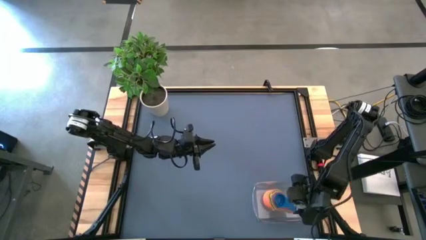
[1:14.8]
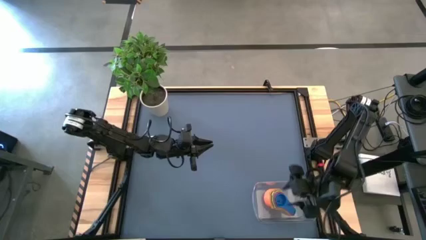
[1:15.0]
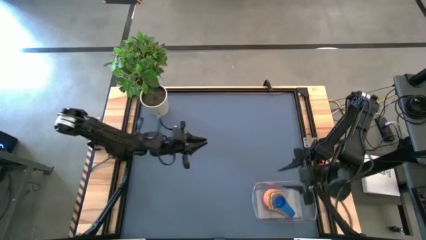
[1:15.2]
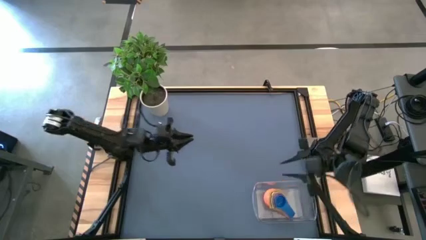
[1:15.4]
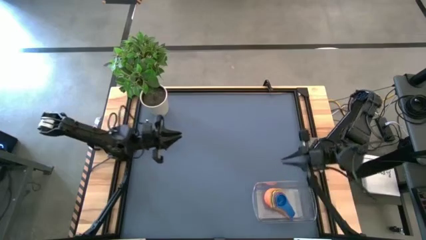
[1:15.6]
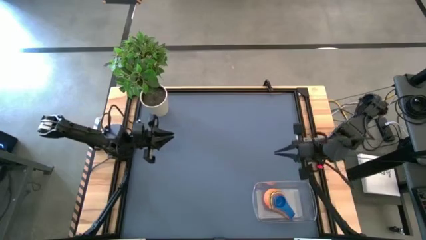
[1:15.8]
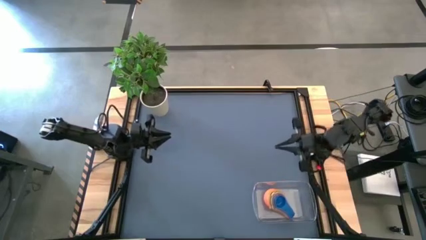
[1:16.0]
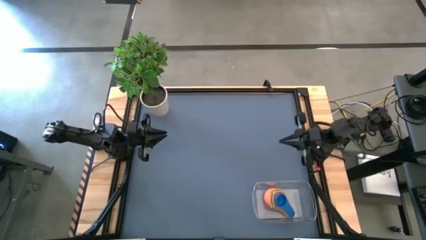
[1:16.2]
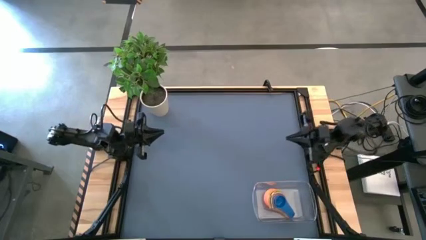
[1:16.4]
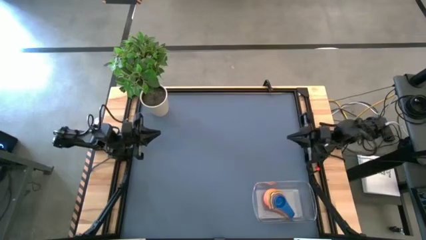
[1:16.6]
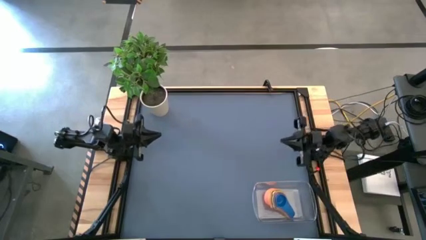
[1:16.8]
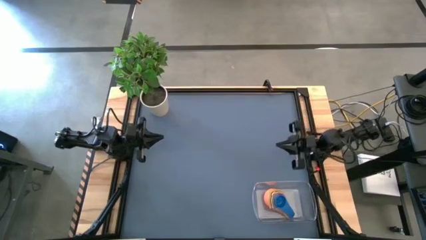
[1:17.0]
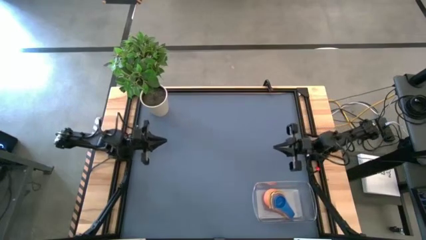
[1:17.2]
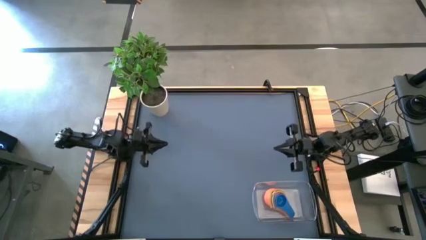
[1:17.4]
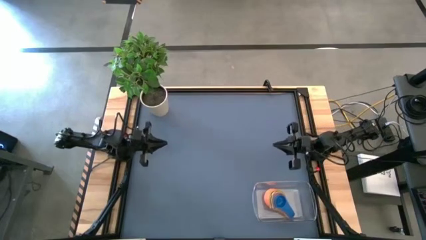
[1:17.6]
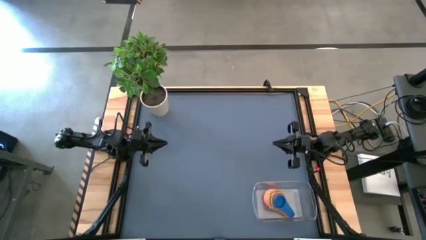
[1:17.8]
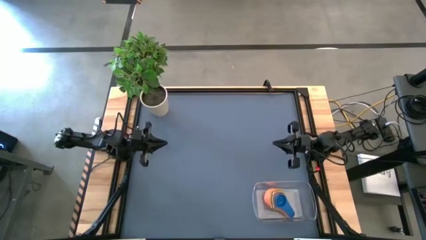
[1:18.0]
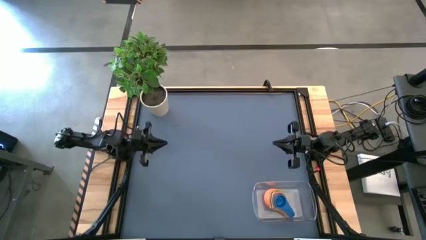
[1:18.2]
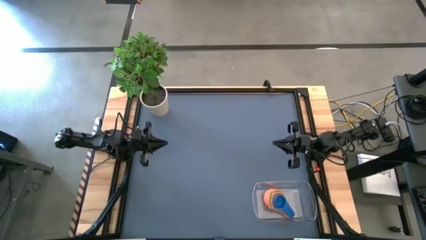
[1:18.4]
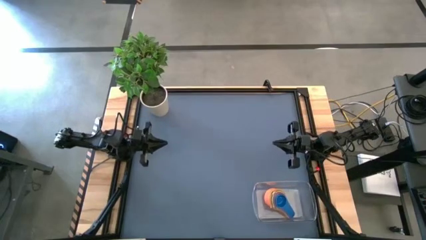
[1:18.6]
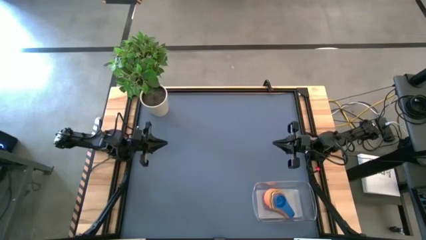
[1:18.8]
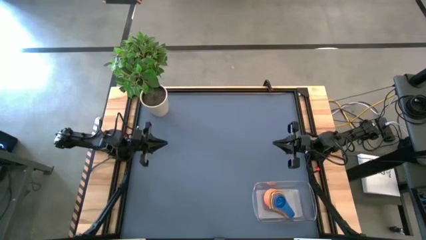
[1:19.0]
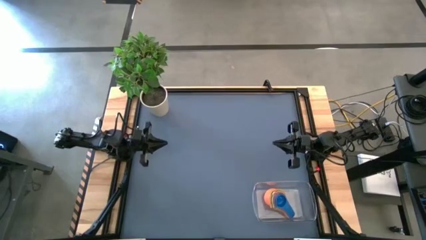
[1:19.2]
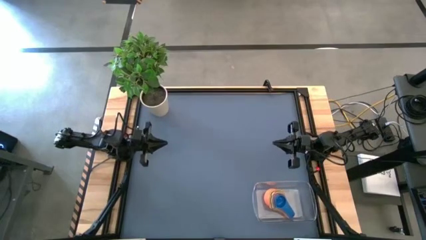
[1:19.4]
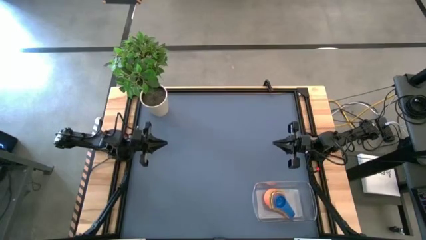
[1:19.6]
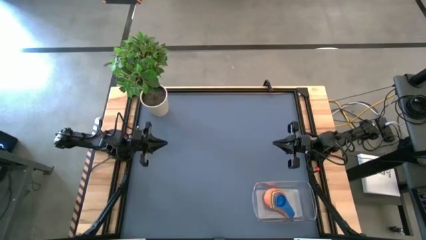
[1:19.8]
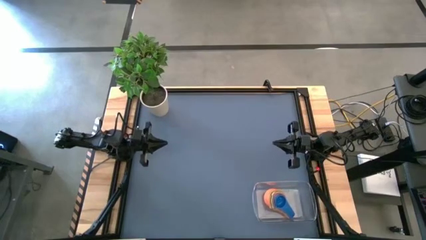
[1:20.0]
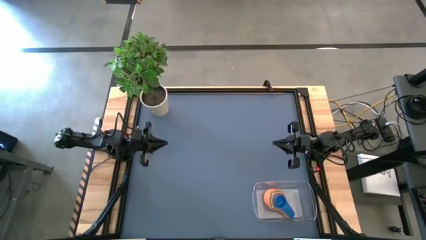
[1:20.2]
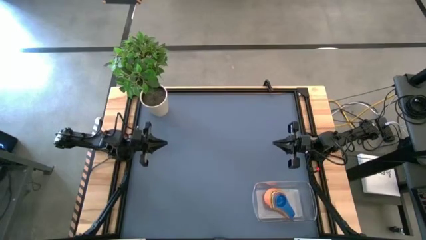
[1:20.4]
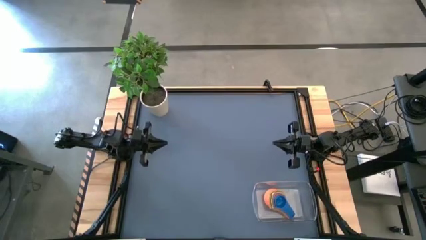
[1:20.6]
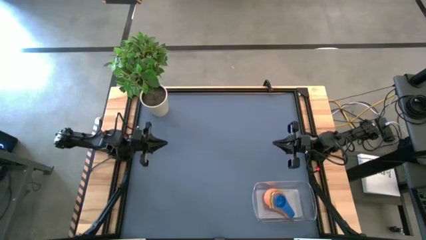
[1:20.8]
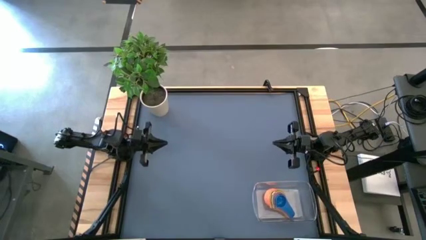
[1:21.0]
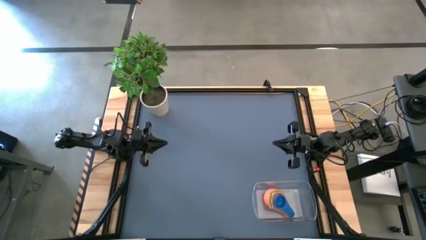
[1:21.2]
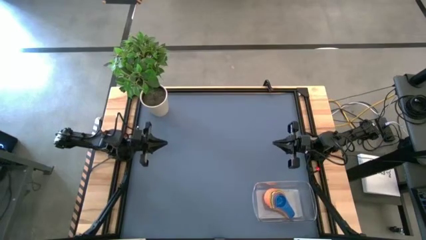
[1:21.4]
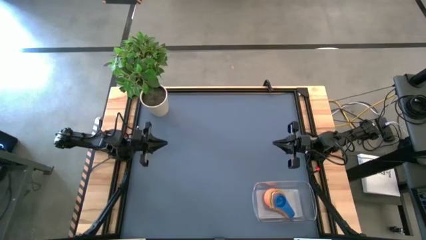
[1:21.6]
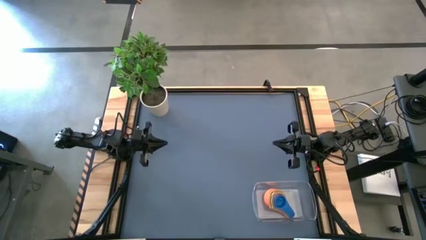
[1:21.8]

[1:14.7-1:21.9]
Task: Nest measuring cups in basket
Return to Home position

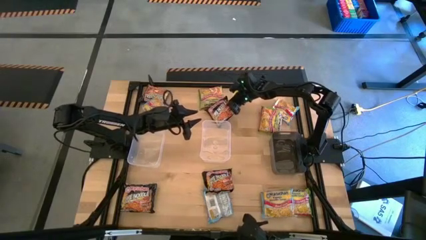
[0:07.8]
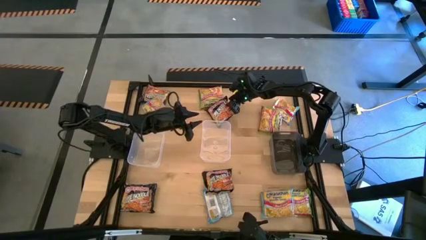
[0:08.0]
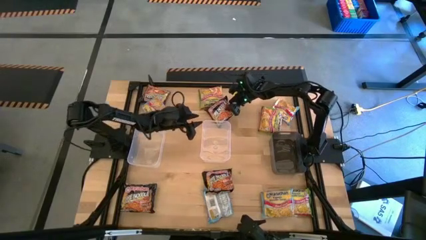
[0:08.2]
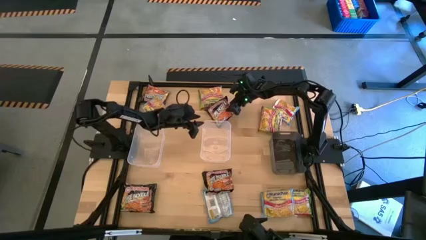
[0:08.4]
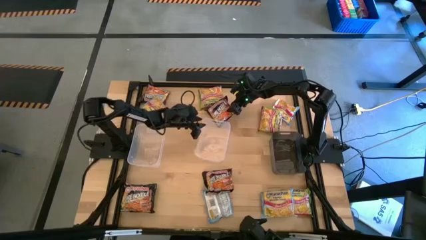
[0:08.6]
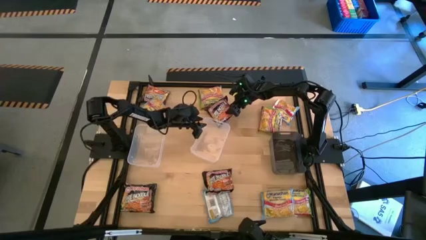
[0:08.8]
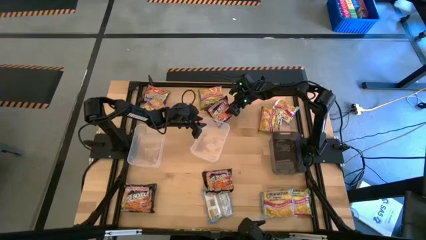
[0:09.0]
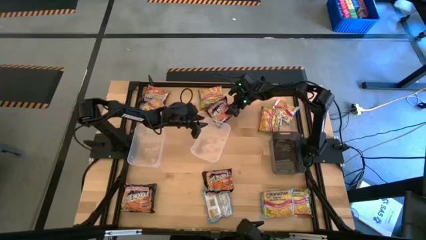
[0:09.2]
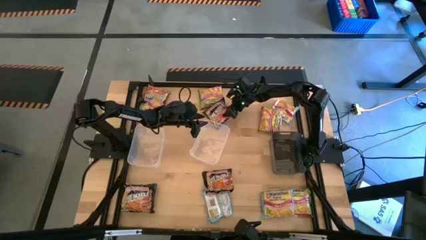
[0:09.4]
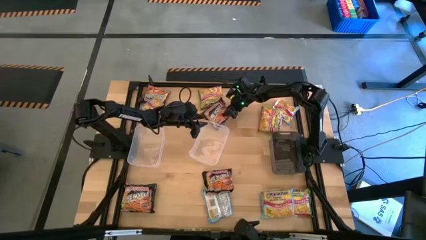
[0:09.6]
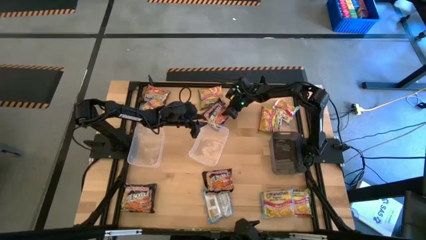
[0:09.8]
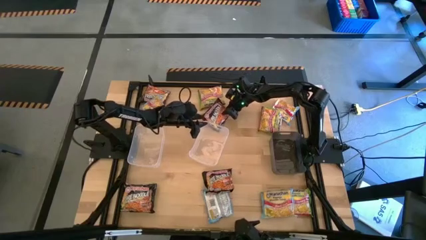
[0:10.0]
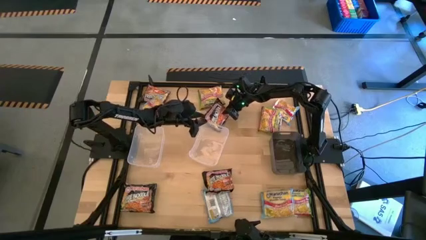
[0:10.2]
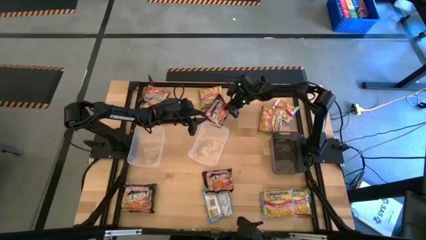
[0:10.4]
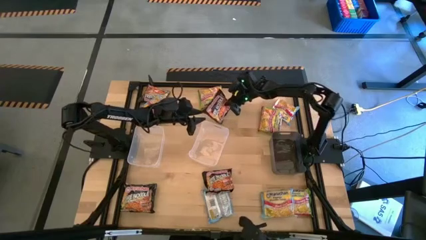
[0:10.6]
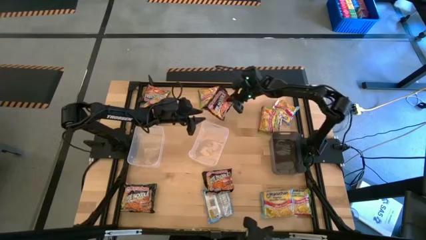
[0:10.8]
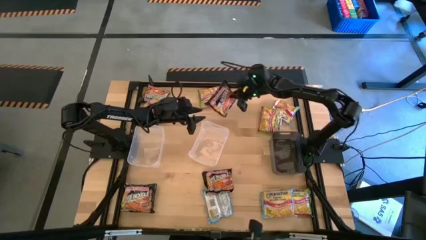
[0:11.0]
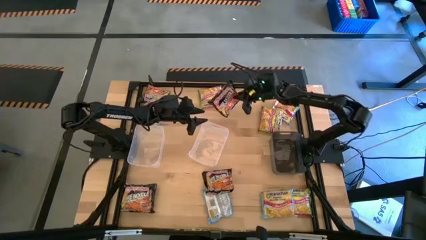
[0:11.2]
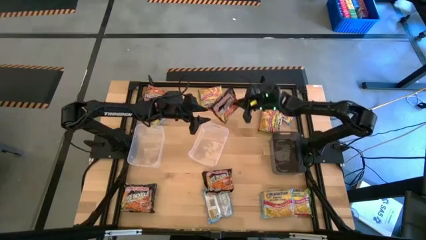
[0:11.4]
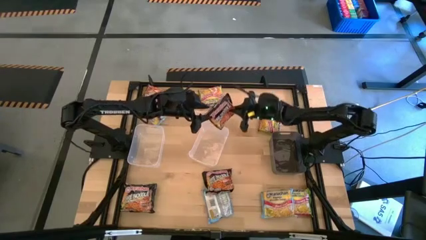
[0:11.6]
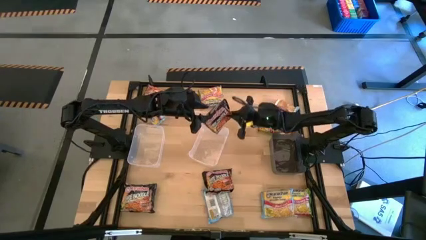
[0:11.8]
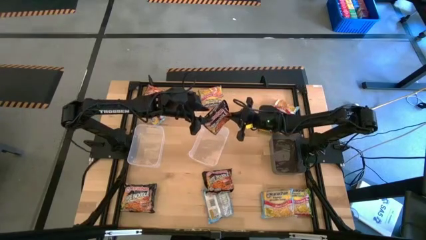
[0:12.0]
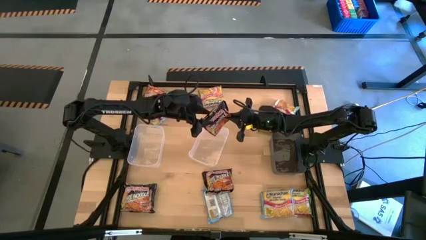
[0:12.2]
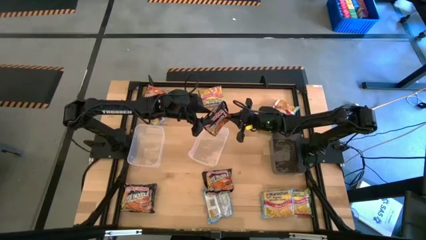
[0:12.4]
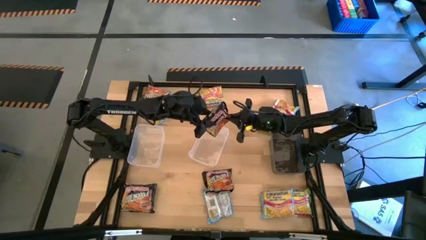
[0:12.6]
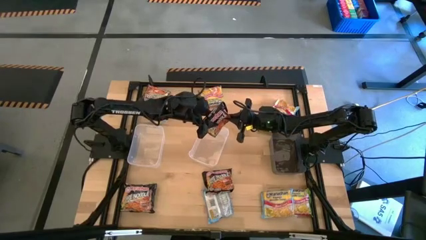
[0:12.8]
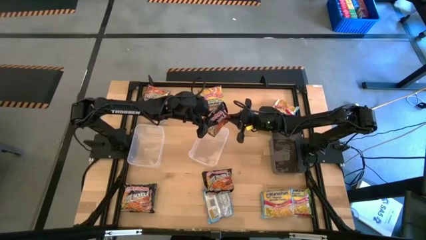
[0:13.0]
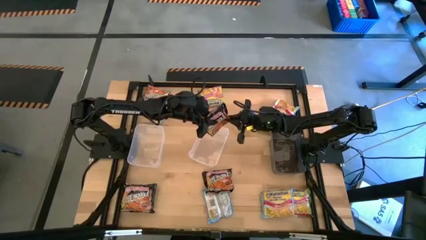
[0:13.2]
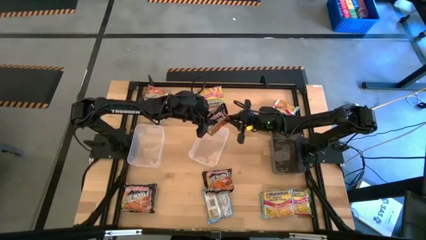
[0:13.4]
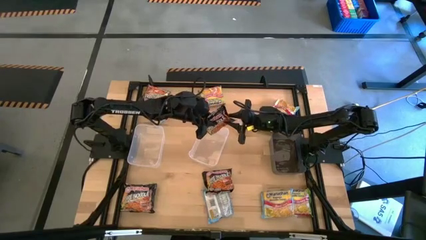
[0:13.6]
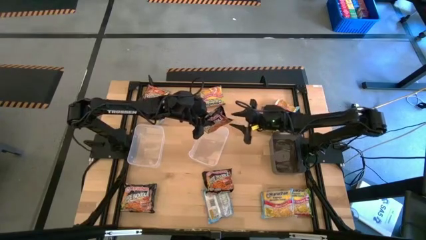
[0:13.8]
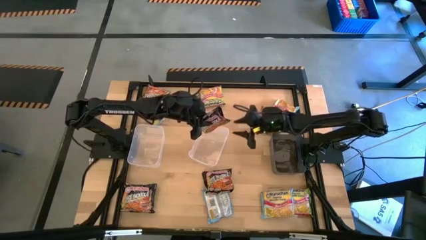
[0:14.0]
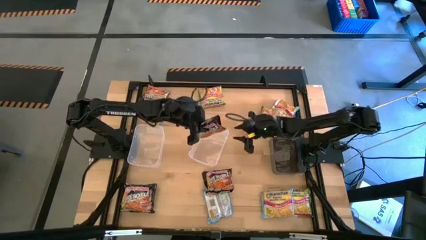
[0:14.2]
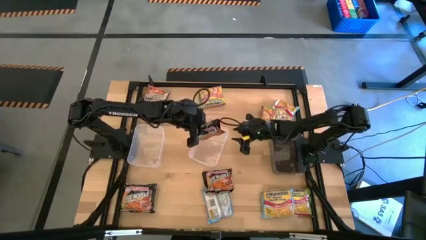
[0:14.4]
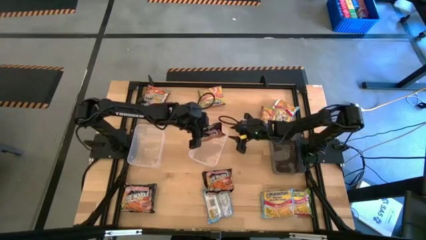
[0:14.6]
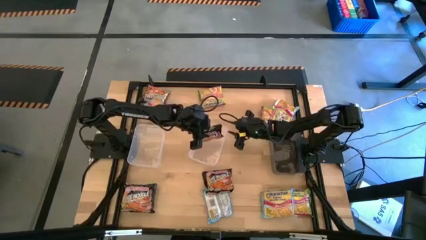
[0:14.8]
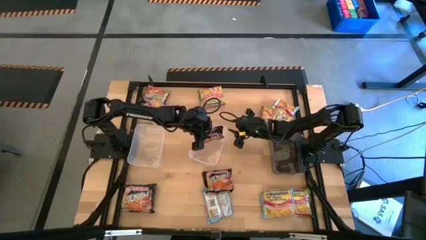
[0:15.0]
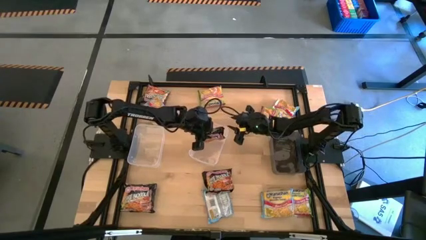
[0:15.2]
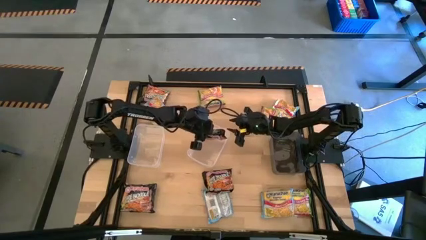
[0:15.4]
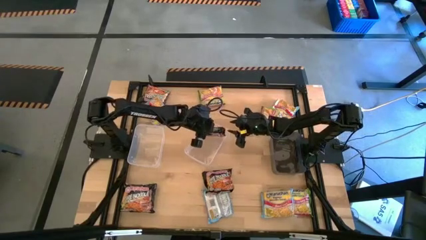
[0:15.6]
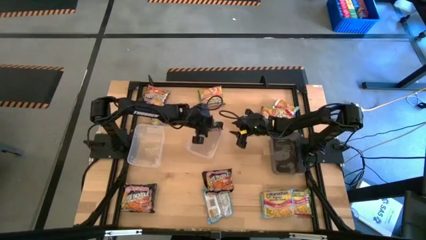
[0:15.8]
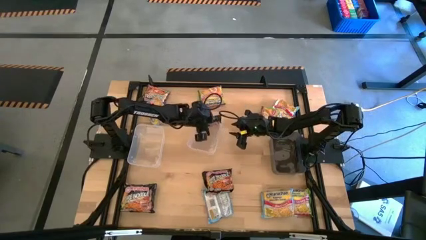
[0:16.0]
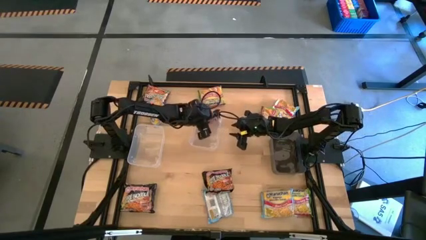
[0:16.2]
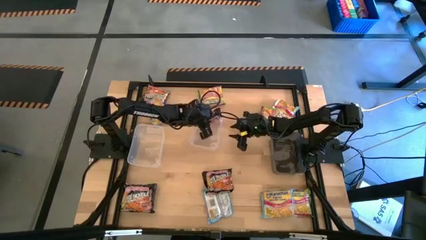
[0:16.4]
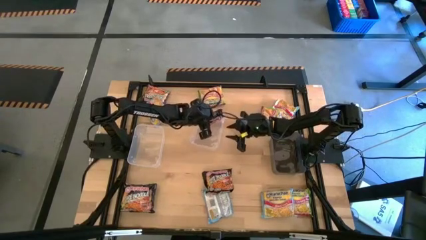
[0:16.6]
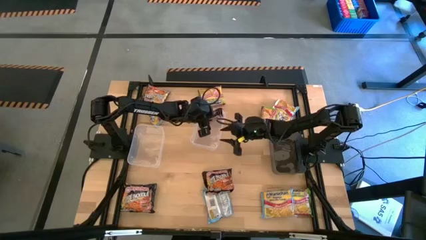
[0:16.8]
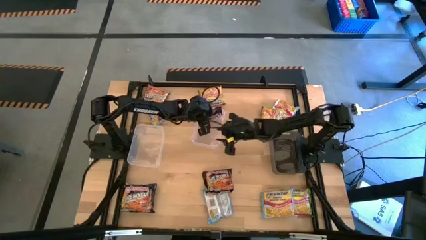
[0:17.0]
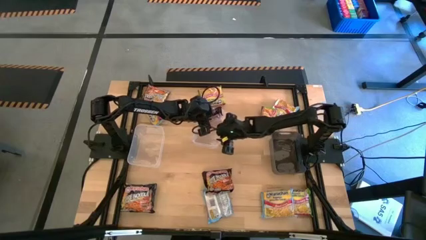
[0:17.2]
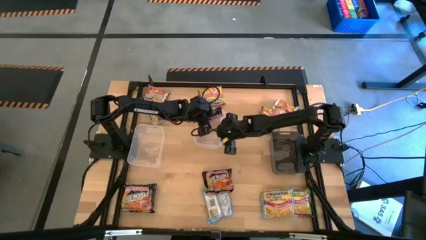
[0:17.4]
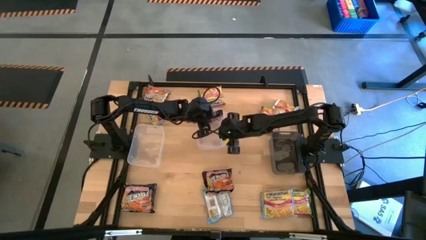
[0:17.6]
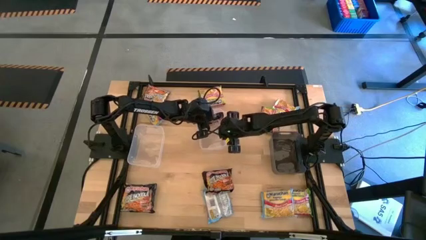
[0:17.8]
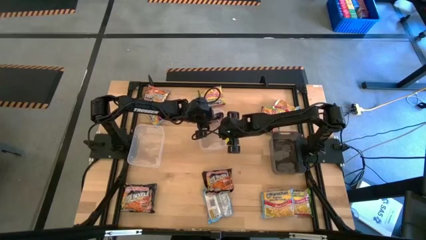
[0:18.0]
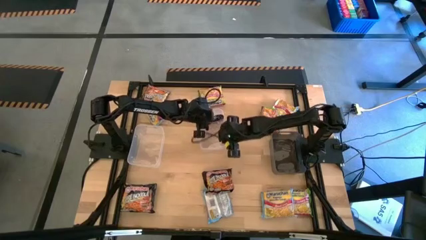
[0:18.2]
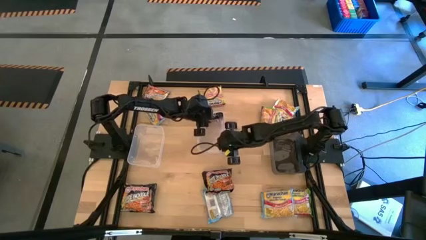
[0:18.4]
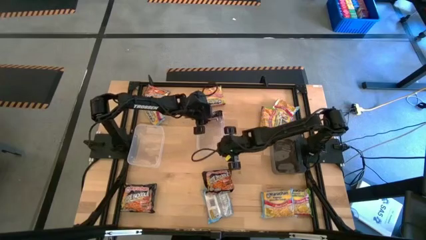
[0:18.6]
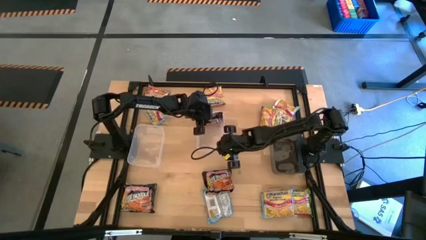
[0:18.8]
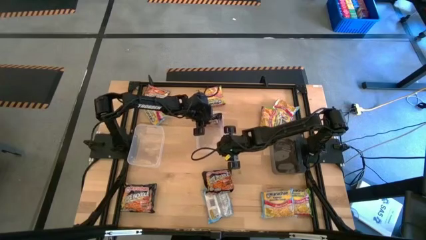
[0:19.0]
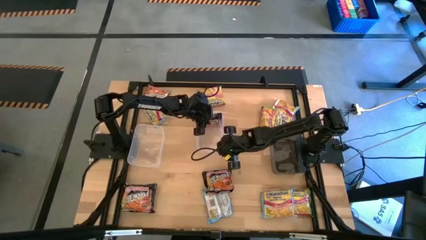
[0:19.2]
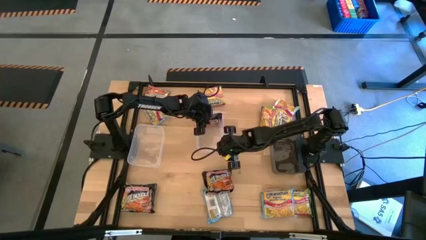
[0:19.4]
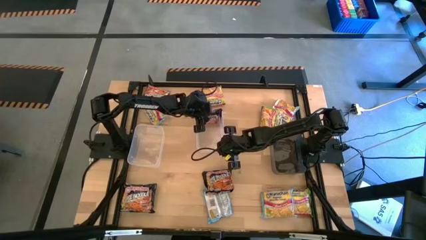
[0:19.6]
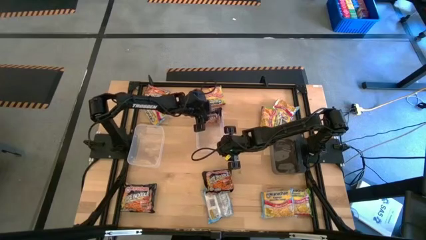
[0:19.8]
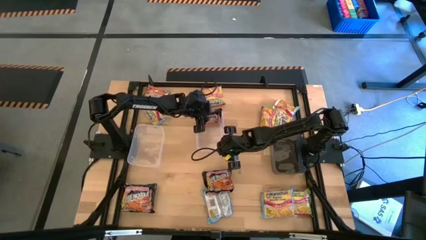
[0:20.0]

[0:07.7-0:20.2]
Task: Sort Maruchan noodles
Put the black noodle pack into the right transparent bin
